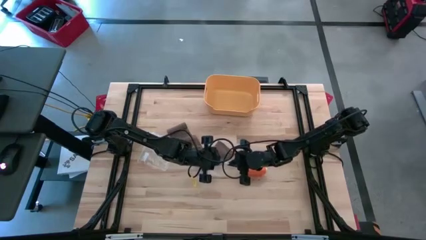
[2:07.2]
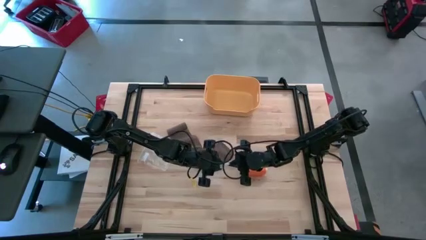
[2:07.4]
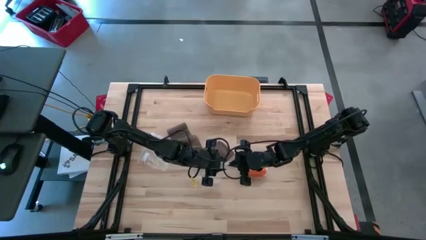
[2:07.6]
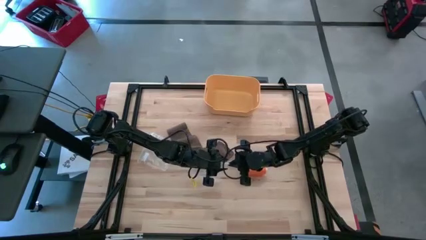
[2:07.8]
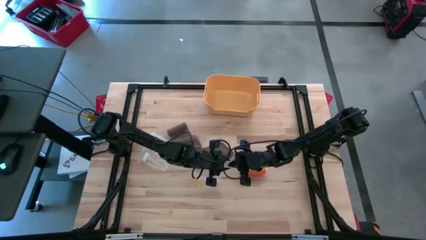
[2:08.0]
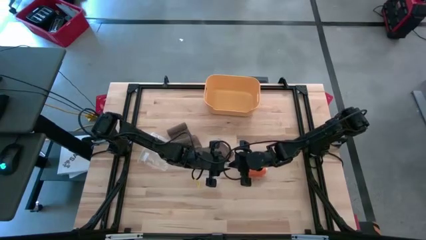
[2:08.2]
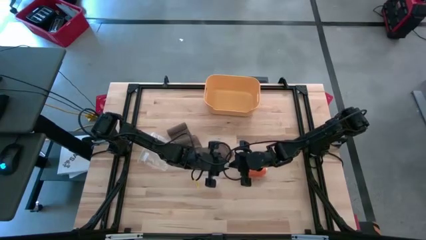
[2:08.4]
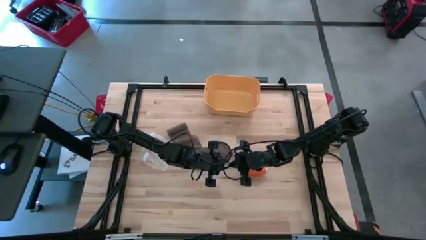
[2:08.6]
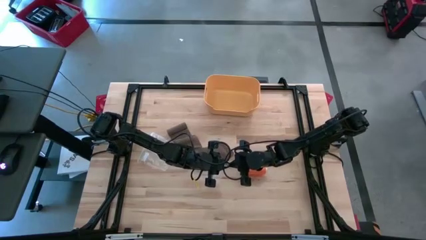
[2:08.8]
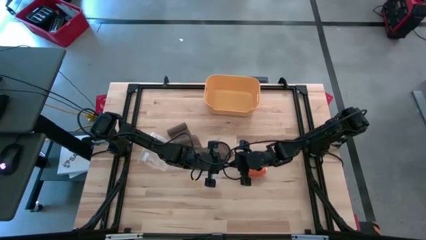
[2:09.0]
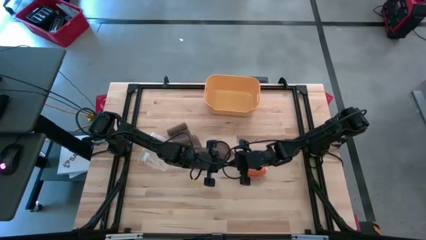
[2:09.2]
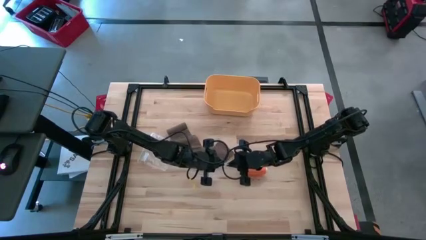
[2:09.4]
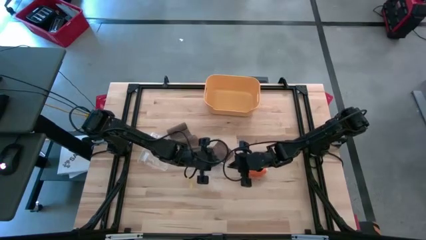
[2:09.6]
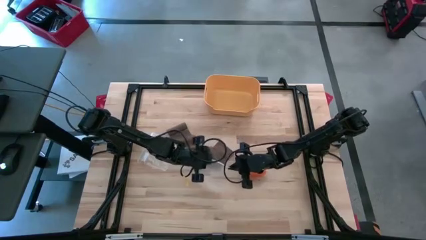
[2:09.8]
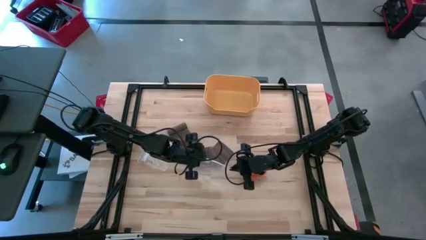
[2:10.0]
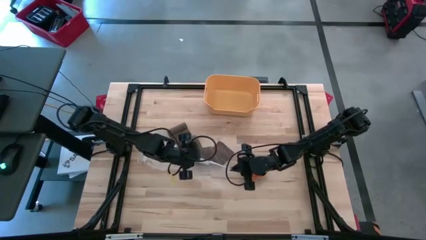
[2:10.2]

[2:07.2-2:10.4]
Task: Roll bandage
Open the bottom transparent zip bag

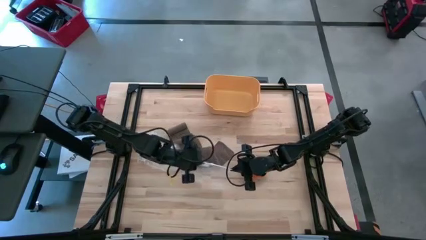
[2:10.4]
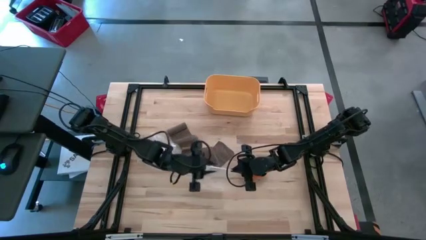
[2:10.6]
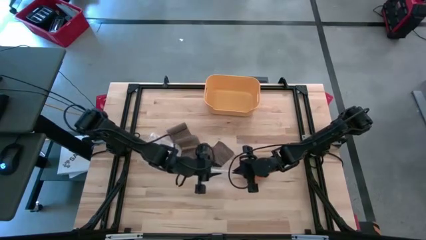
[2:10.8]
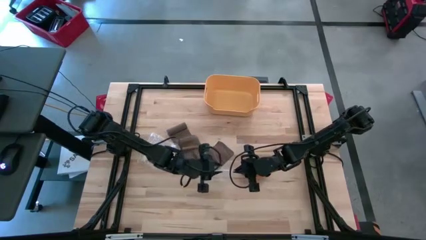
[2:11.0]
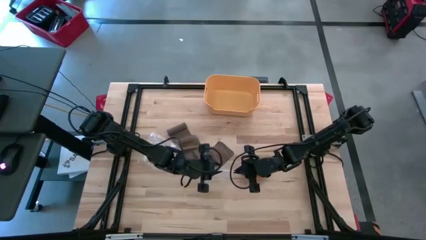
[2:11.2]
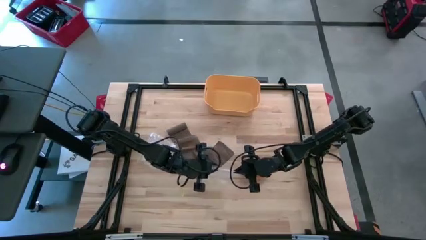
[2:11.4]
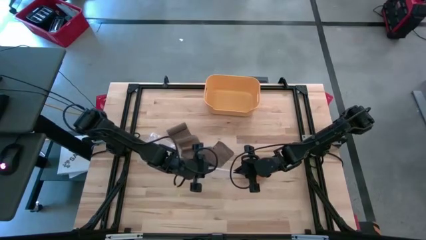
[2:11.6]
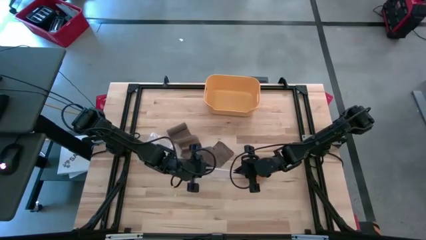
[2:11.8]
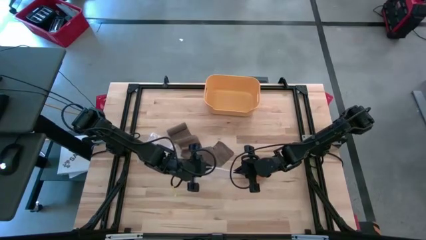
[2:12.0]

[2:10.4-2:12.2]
Open the bottom transparent zip bag

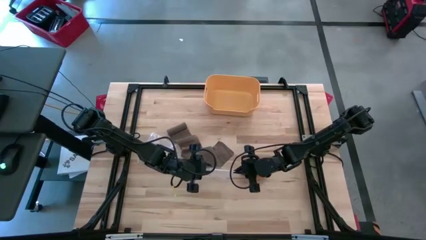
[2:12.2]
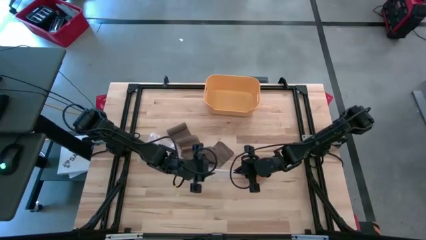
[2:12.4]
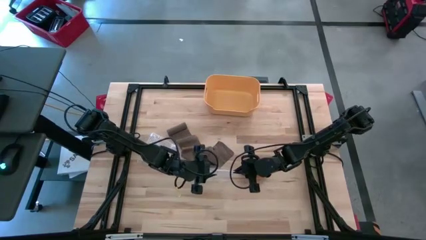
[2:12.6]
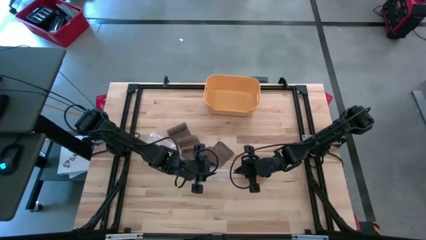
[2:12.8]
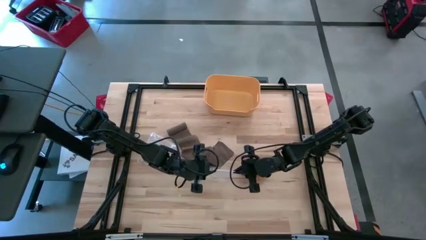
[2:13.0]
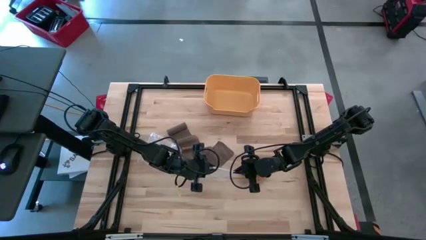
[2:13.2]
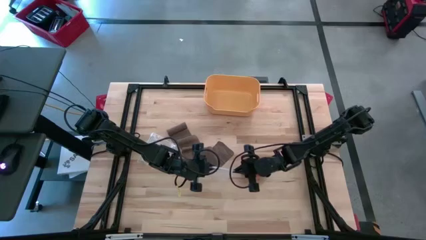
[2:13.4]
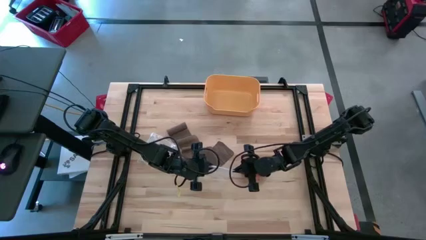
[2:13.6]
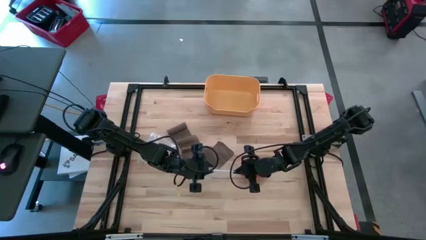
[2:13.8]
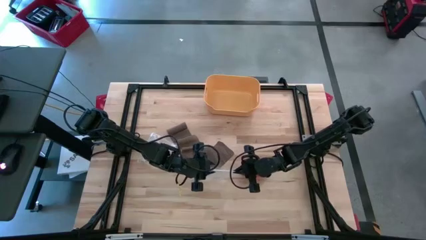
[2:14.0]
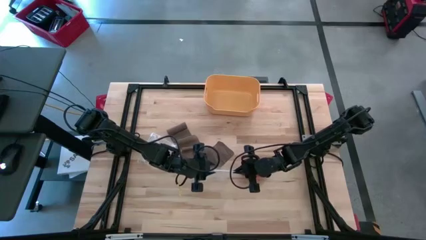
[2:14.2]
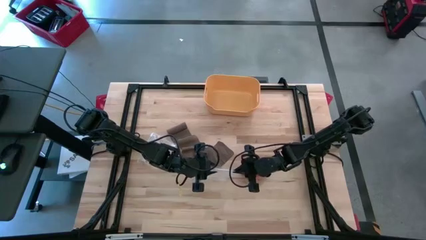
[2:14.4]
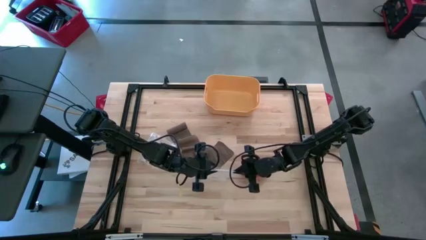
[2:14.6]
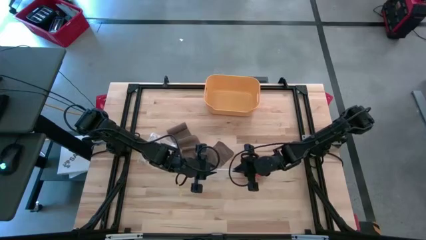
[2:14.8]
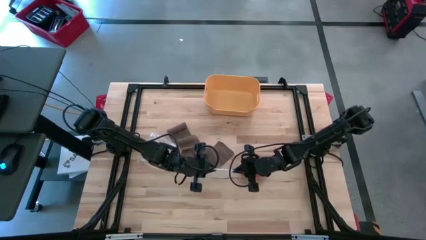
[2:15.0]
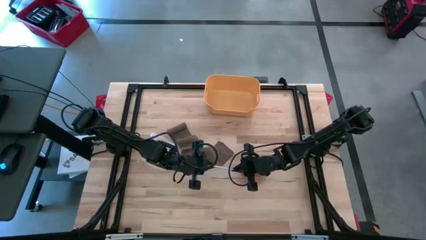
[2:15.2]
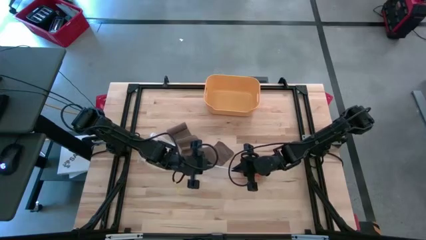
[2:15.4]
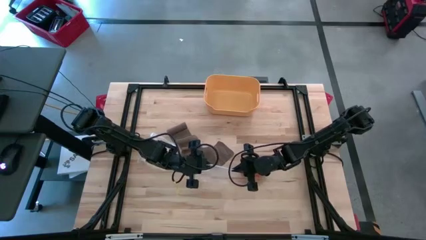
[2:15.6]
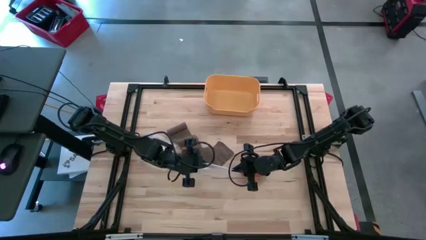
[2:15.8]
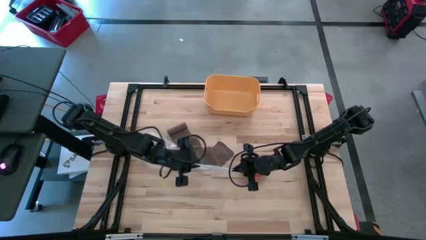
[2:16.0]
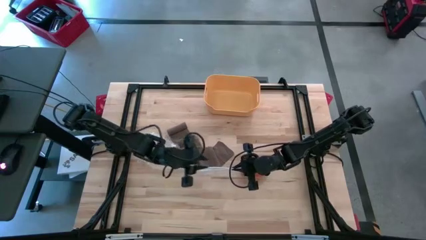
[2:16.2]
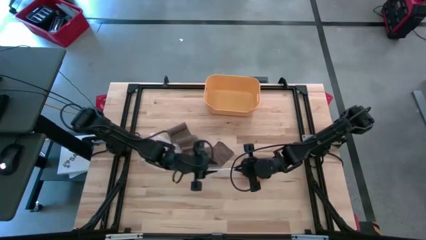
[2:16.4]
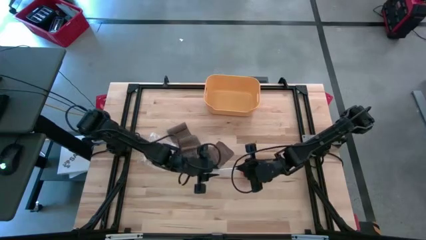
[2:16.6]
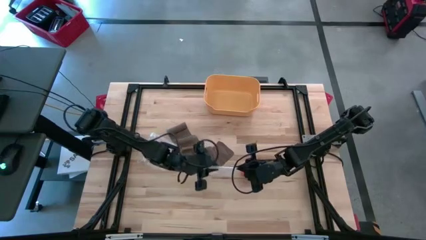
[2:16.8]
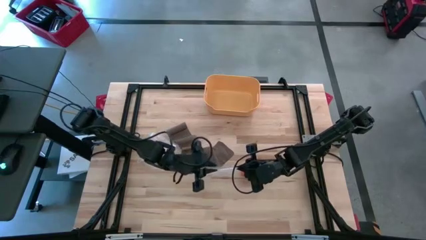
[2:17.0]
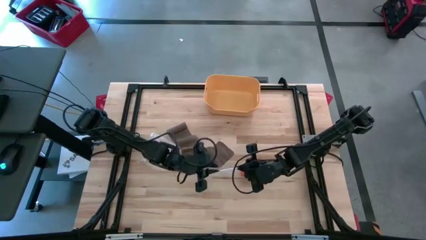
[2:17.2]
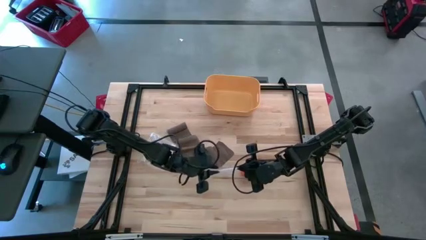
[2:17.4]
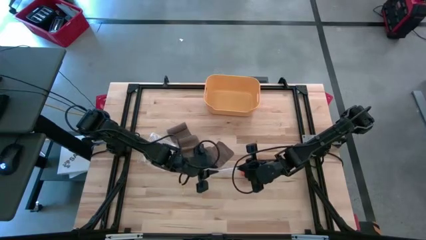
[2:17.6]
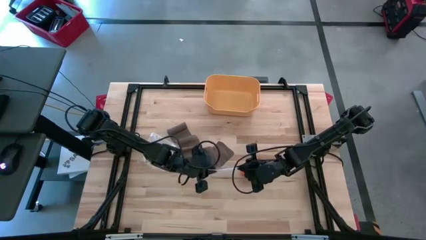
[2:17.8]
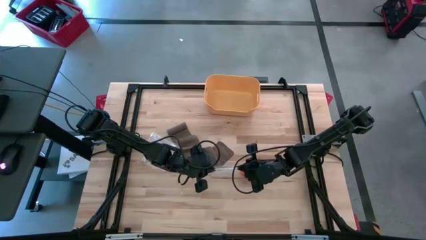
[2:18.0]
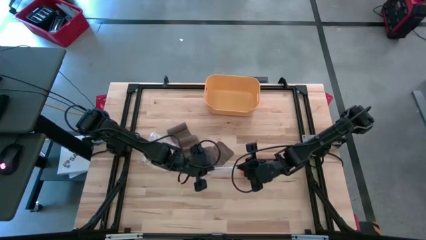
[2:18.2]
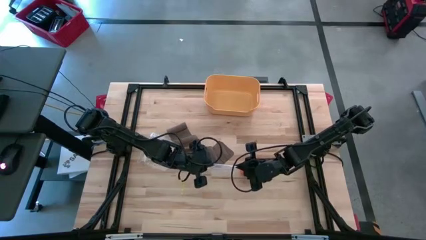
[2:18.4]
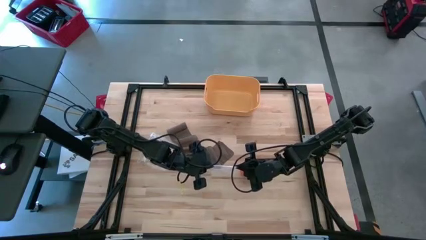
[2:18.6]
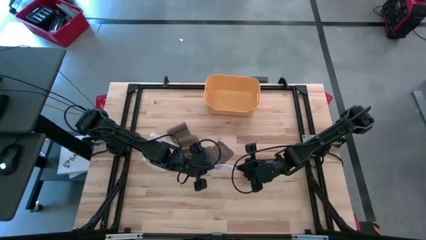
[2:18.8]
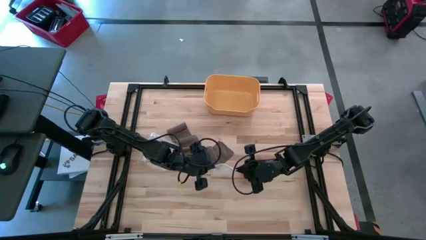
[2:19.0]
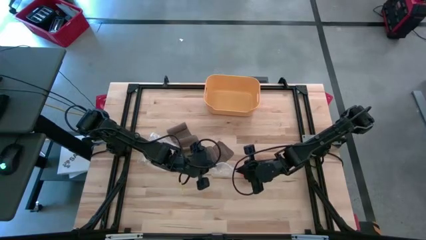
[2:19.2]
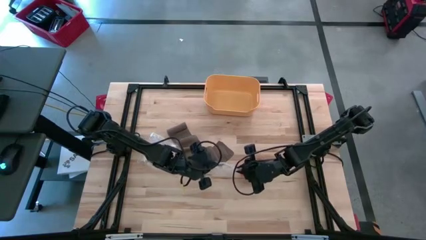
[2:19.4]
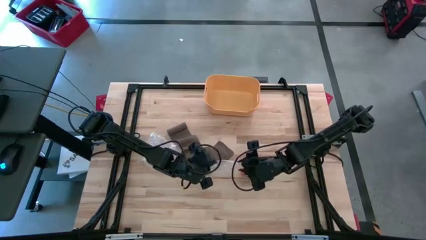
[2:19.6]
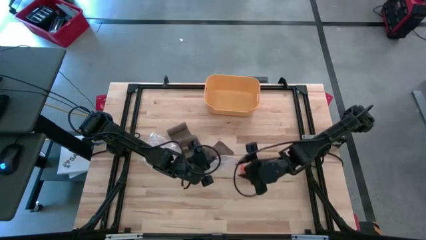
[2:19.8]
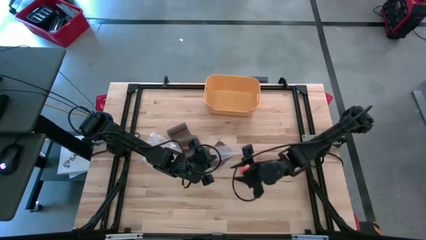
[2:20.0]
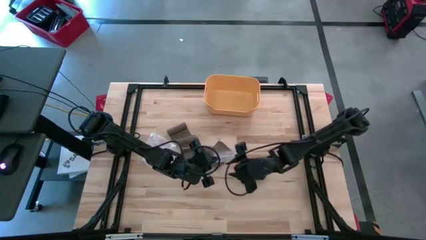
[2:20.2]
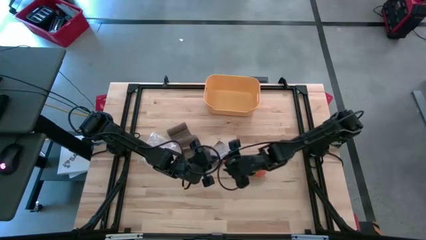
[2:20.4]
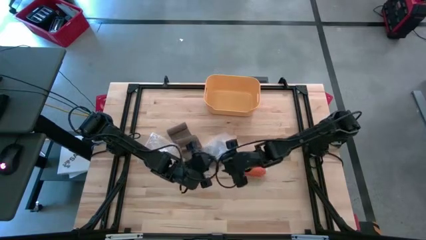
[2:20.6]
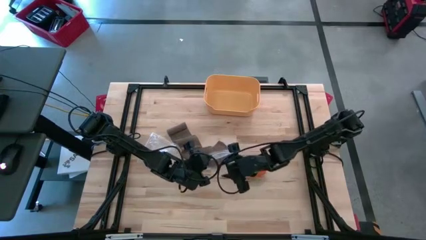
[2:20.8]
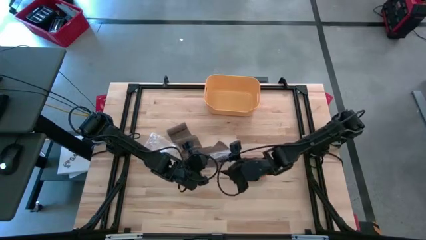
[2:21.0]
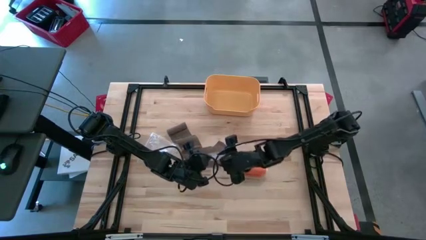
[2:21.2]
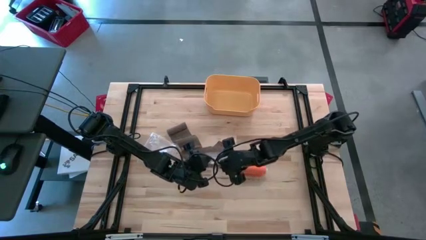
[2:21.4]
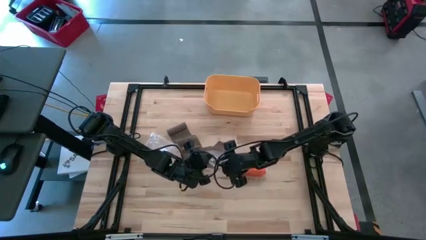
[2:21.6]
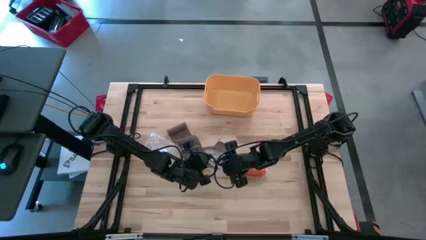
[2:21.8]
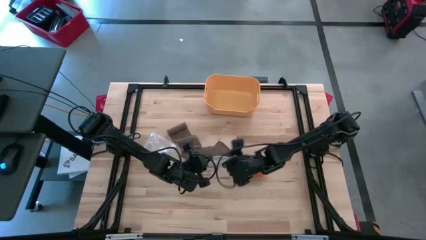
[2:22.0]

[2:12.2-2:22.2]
Open the bottom transparent zip bag

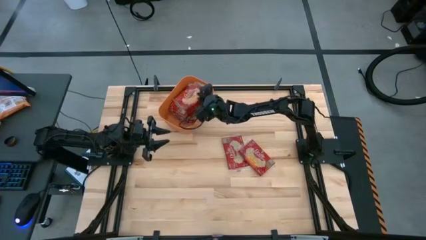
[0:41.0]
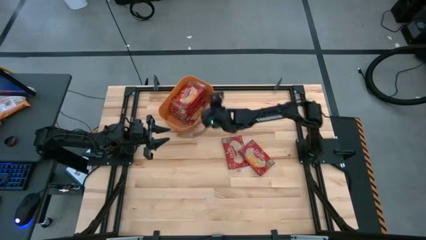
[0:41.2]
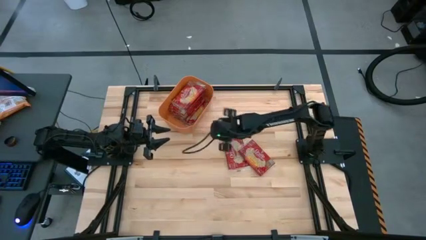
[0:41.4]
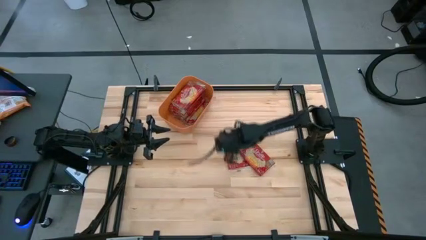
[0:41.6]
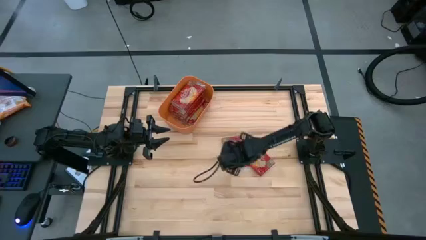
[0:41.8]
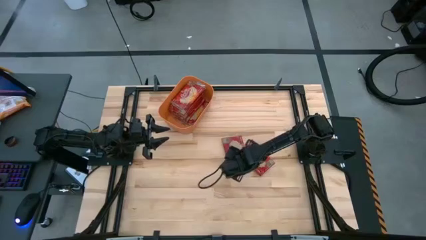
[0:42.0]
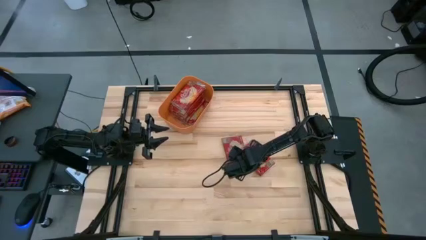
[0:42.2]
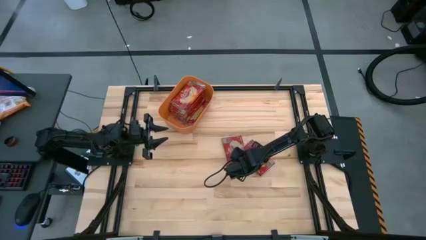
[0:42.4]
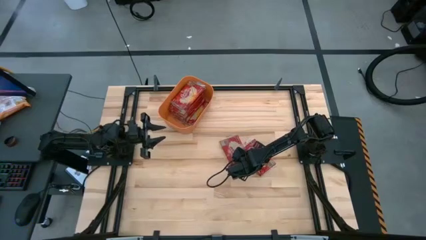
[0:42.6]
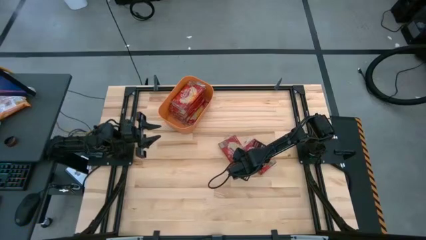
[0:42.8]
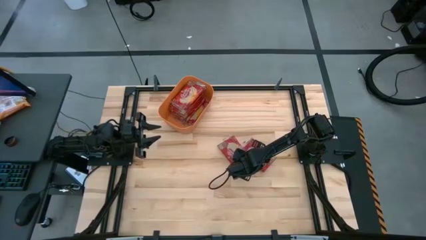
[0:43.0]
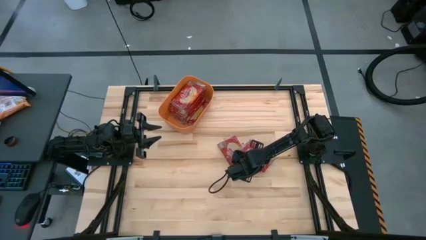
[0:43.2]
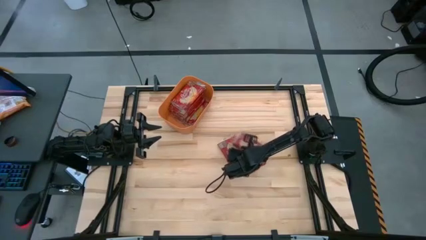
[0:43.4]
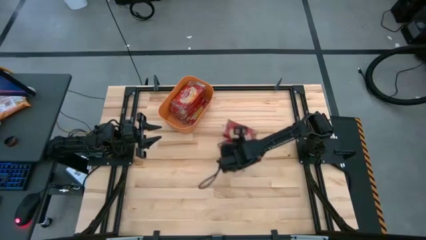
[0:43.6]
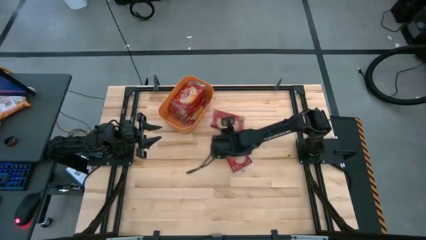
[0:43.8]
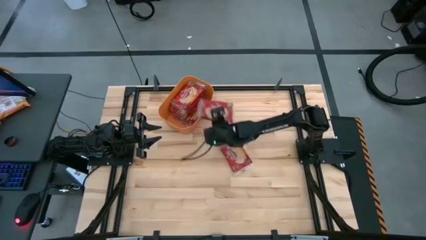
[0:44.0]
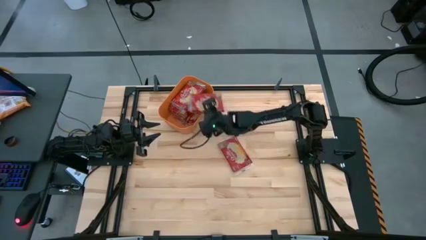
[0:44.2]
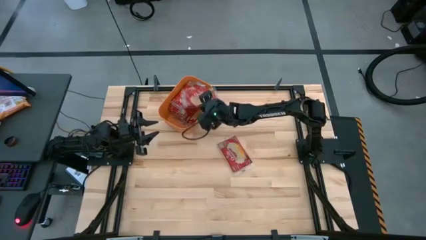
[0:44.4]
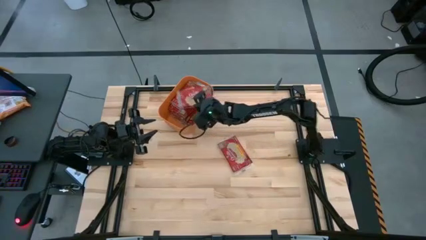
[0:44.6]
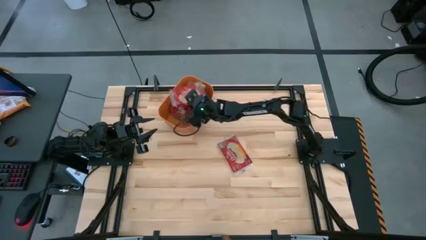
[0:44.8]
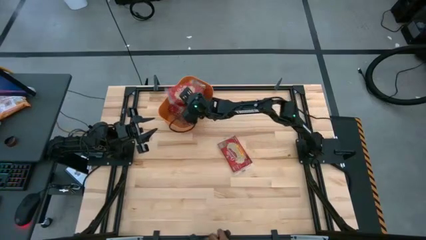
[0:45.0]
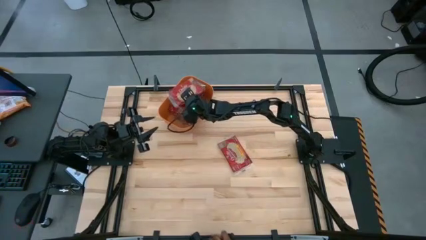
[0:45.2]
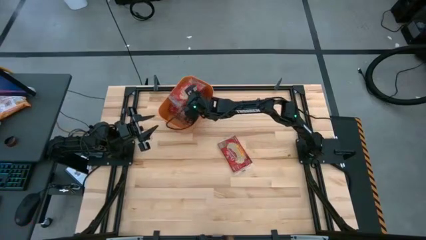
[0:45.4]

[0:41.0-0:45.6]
Task: Sort popcorn bags into baskets
Put the red popcorn bag into the orange bin
